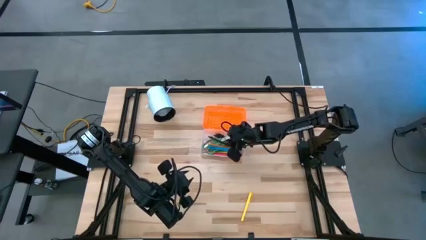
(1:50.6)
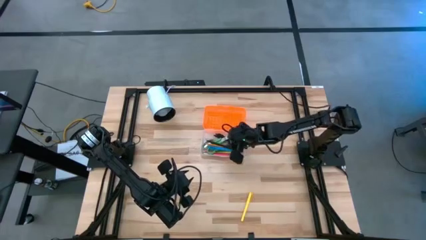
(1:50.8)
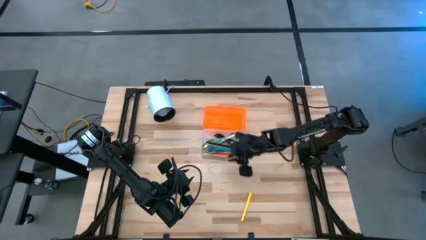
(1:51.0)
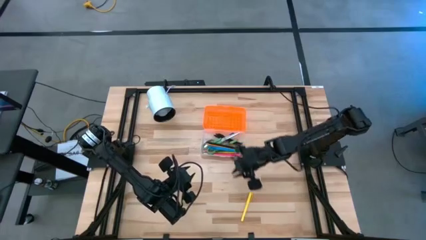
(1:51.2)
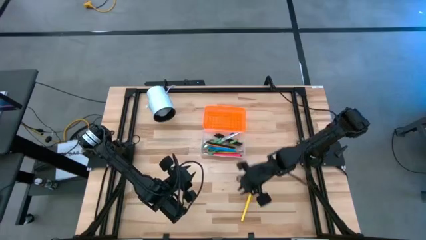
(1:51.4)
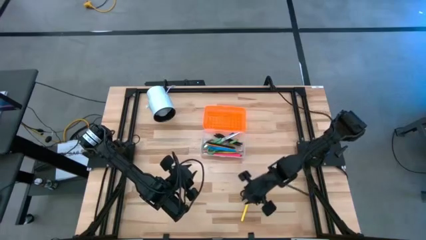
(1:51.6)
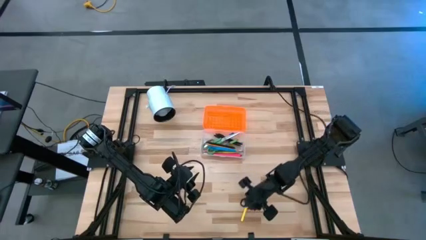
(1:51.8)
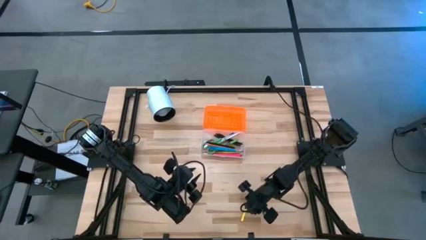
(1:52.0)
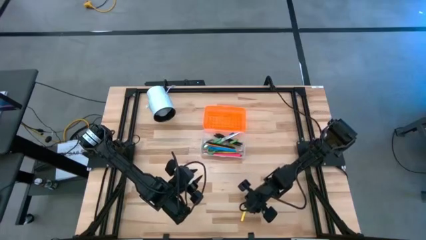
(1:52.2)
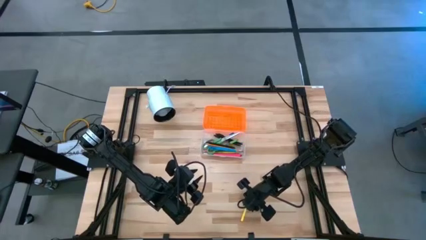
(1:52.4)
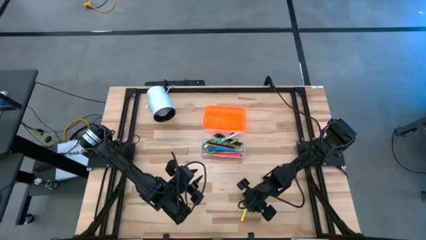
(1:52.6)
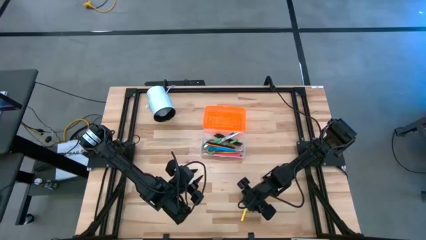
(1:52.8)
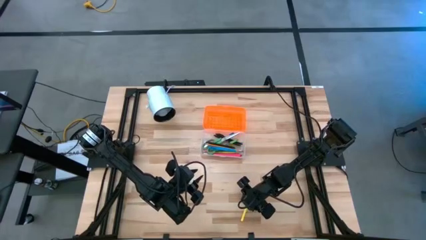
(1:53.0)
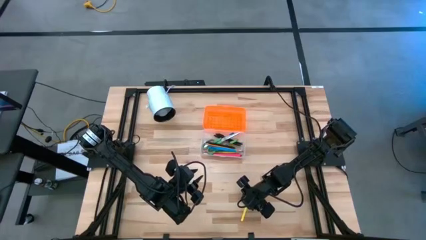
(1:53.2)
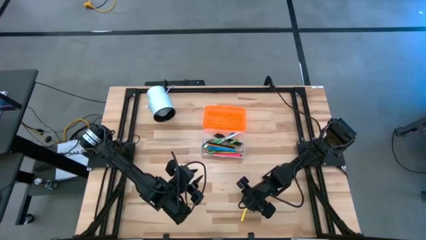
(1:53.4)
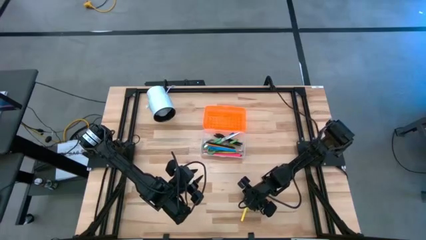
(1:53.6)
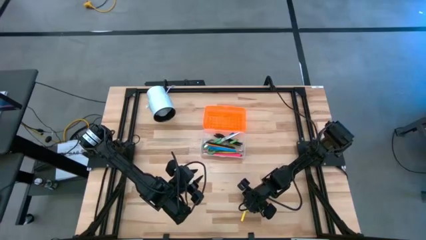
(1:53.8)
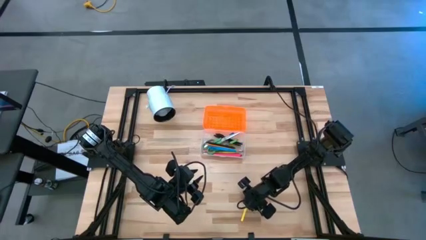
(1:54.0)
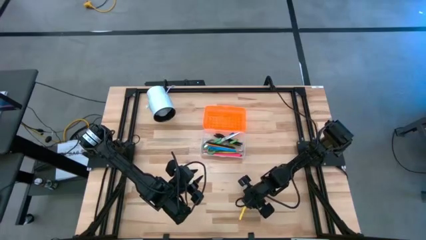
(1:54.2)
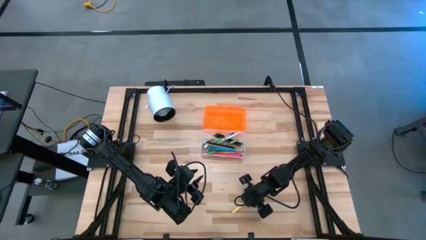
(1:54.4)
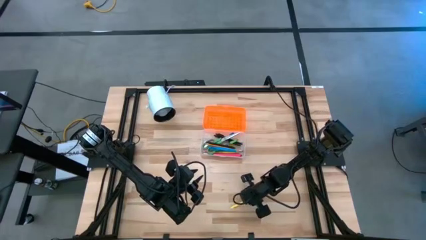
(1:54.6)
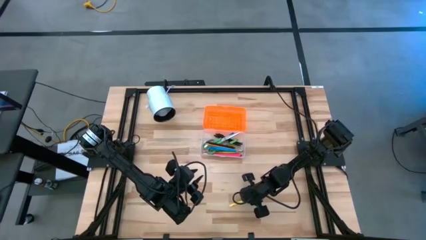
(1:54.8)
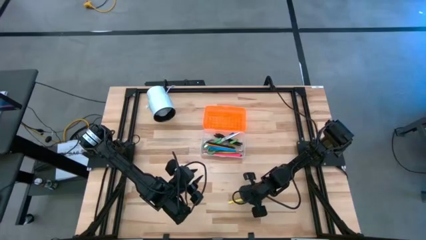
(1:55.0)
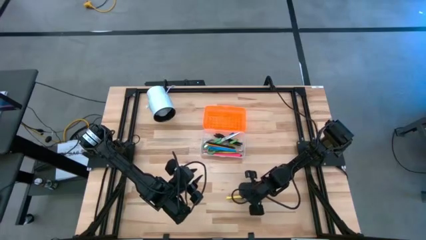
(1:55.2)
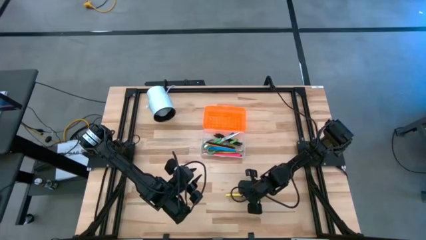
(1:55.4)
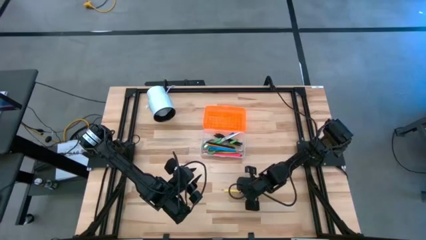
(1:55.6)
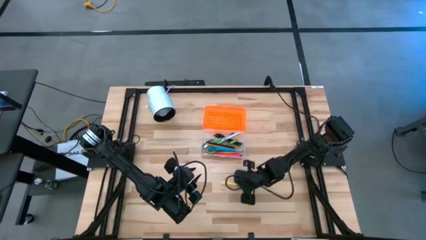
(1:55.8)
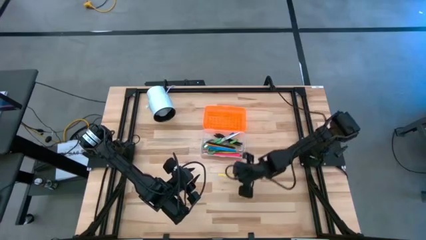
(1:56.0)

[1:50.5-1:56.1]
Task: Pick & place school supplies into a supply box
Put the yellow pen into the orange supply box

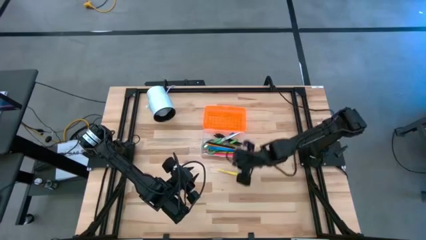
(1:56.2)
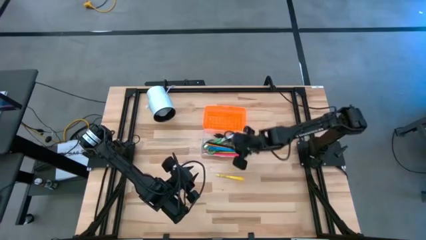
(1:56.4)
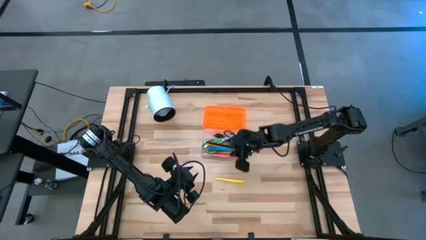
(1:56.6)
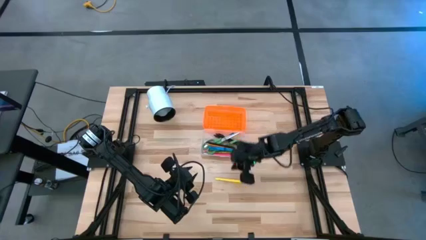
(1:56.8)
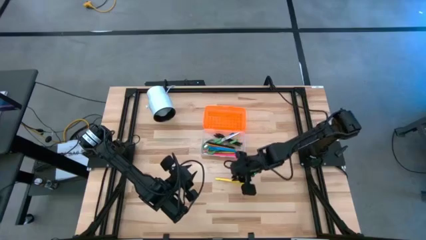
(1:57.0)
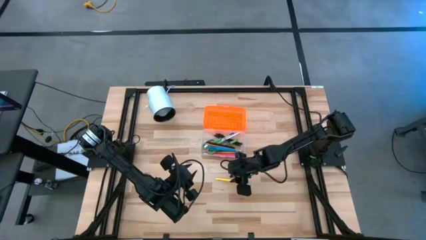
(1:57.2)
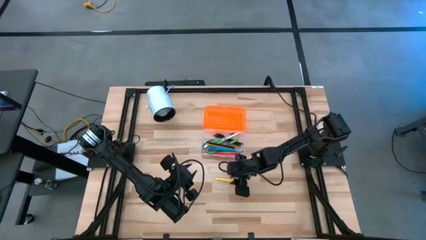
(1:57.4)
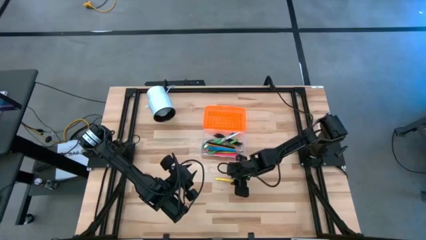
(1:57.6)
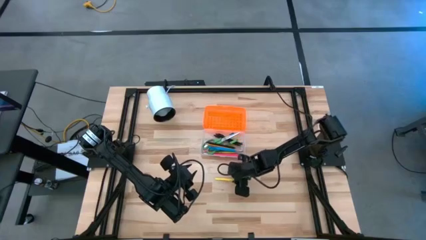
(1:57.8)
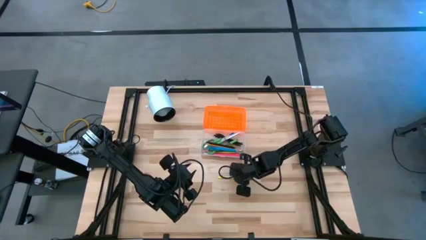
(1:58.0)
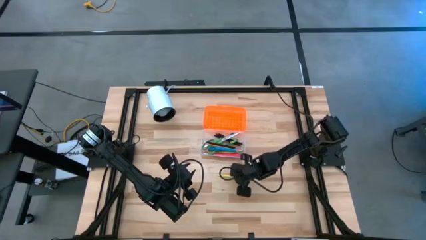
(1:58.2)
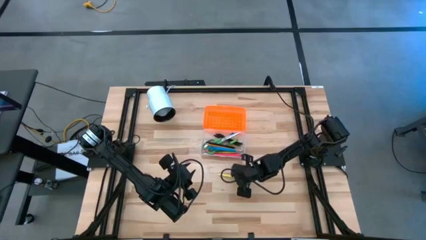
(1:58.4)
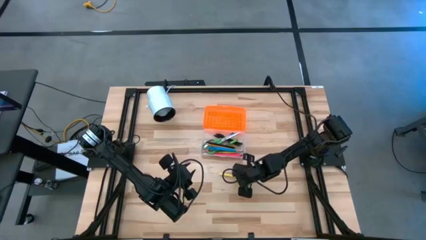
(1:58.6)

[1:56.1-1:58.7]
Put the yellow pen into the orange supply box

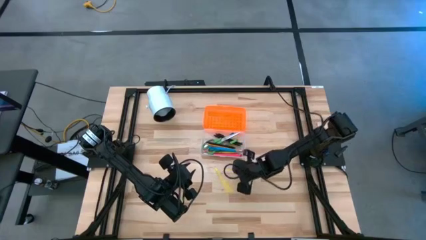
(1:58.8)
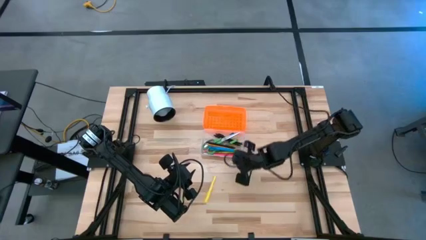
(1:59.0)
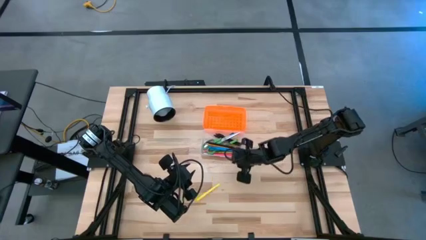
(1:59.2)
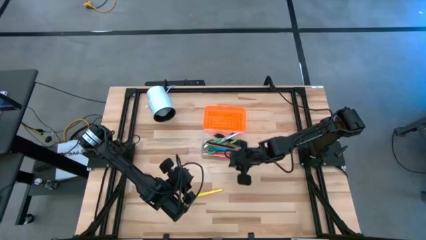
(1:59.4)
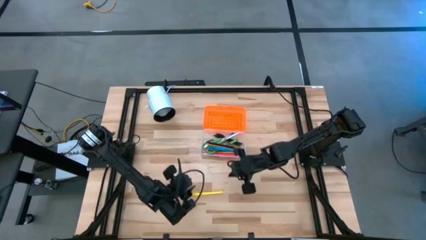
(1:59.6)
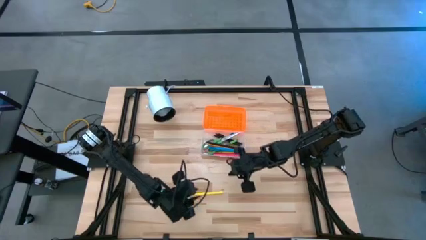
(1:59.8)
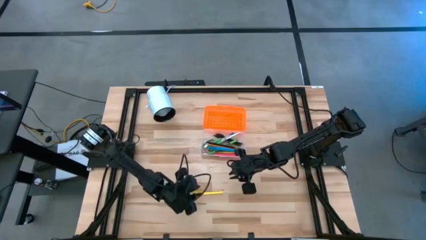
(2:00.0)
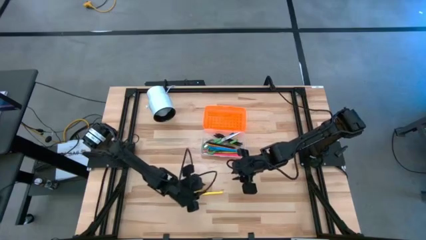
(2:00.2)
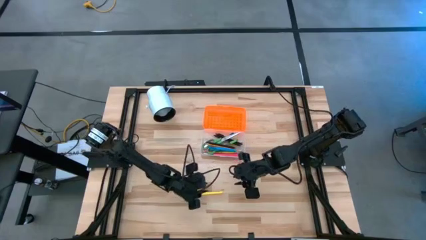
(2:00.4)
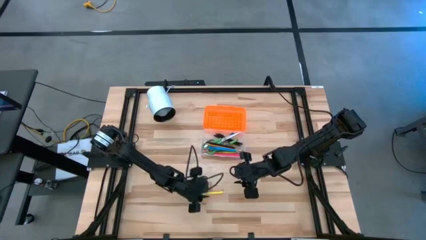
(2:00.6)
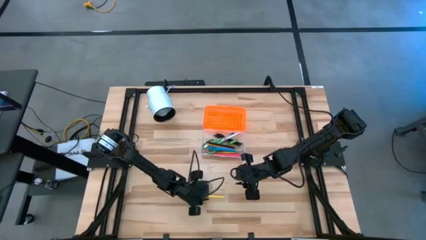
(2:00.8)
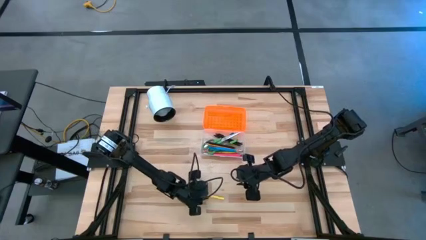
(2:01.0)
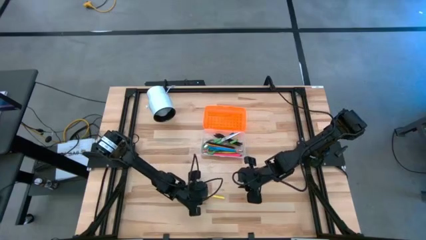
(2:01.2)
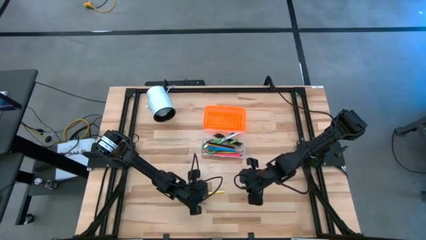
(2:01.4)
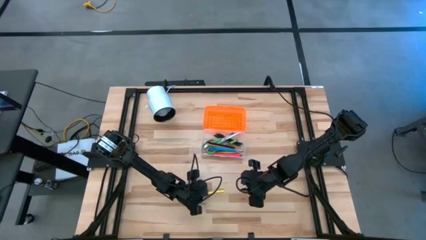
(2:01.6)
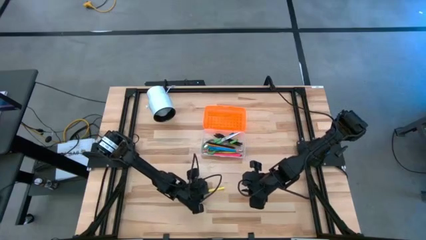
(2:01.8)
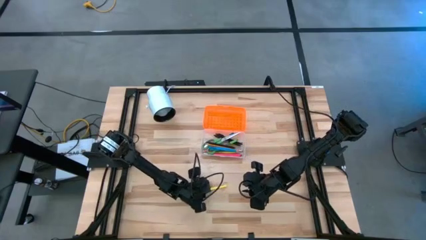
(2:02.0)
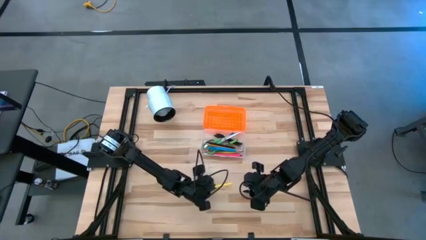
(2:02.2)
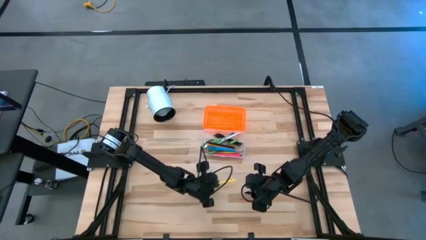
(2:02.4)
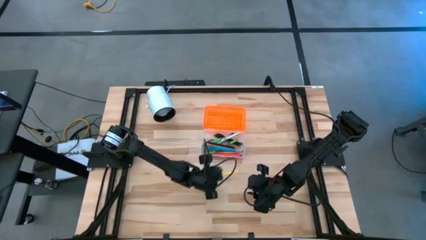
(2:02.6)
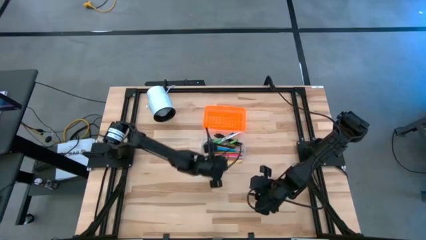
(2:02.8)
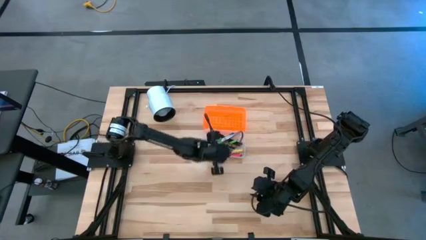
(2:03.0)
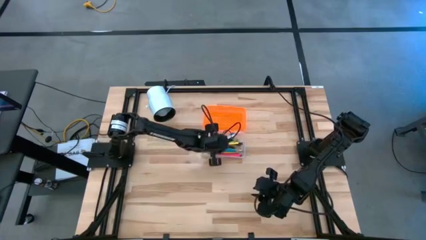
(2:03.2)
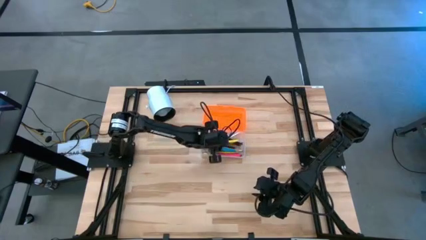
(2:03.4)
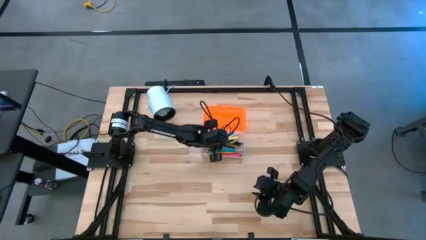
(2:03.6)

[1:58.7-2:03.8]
Put the yellow pen into the orange supply box

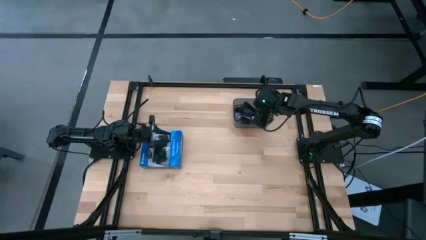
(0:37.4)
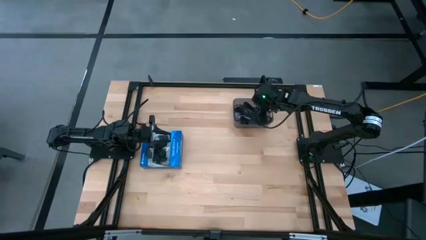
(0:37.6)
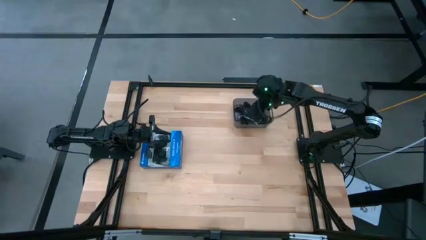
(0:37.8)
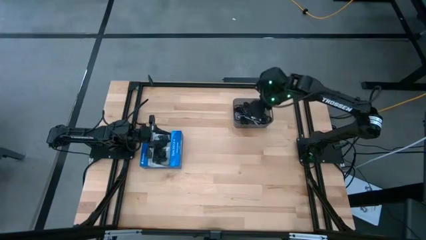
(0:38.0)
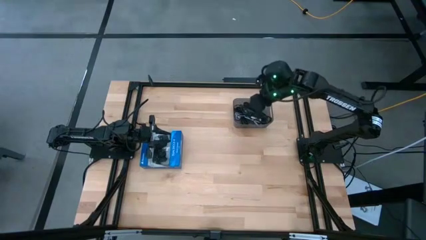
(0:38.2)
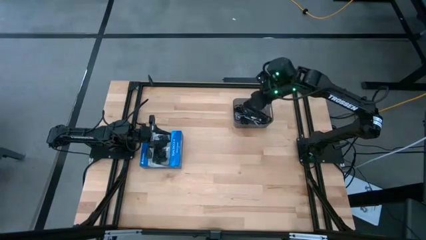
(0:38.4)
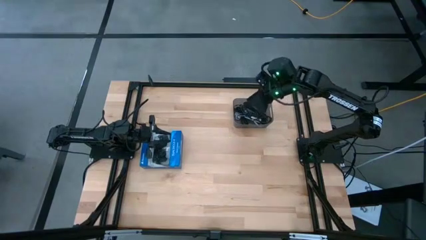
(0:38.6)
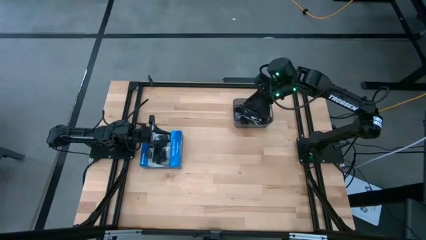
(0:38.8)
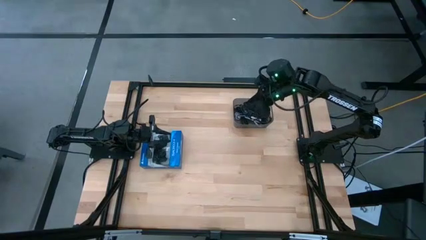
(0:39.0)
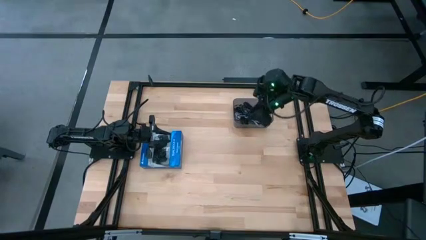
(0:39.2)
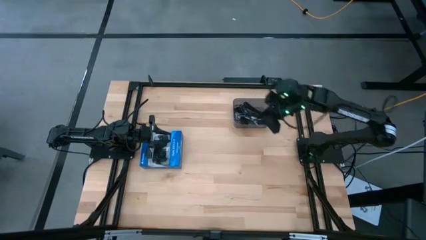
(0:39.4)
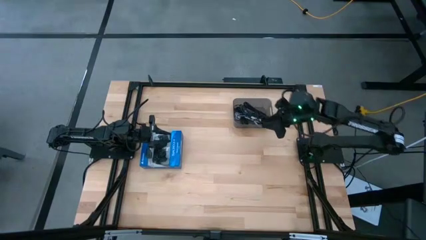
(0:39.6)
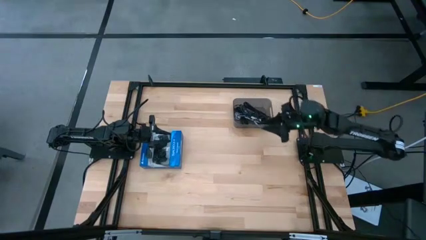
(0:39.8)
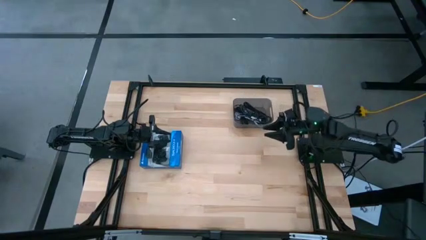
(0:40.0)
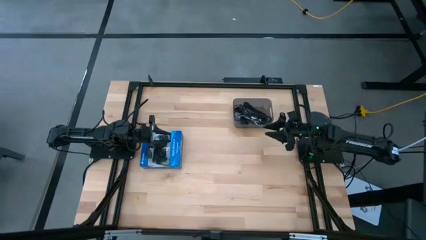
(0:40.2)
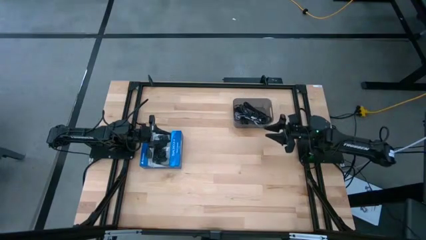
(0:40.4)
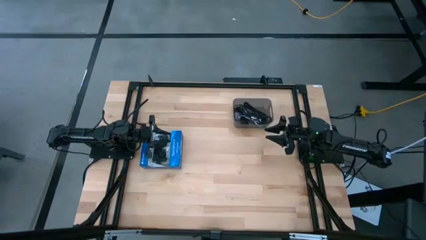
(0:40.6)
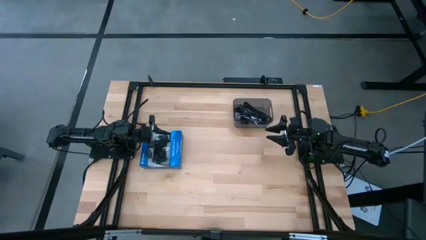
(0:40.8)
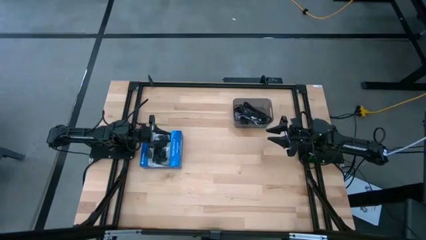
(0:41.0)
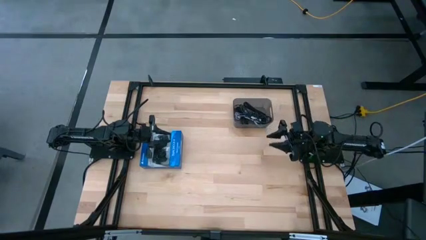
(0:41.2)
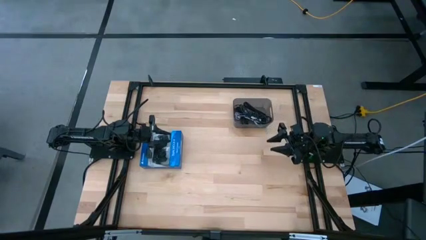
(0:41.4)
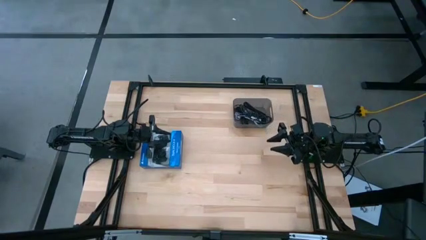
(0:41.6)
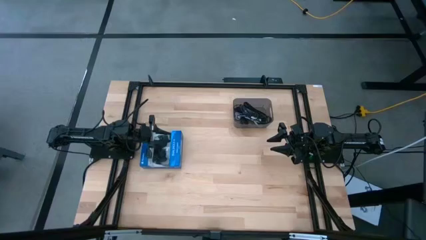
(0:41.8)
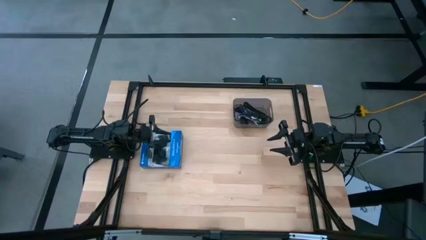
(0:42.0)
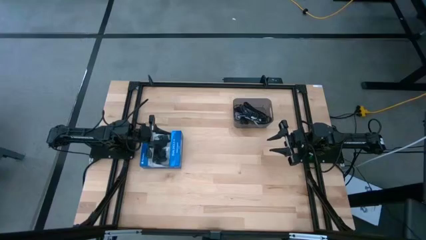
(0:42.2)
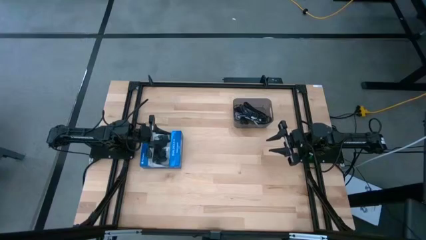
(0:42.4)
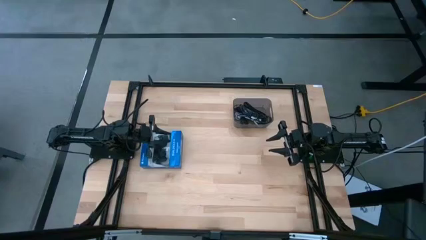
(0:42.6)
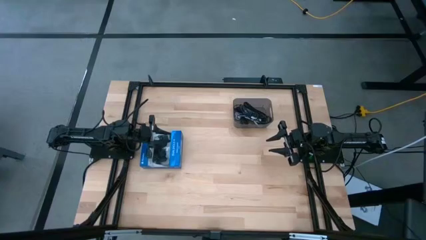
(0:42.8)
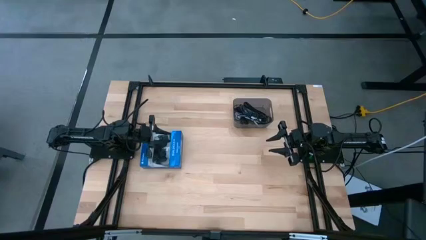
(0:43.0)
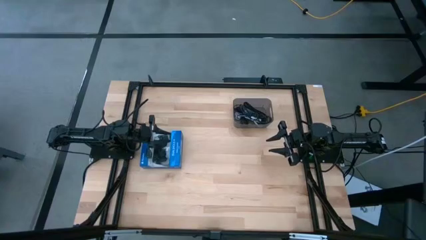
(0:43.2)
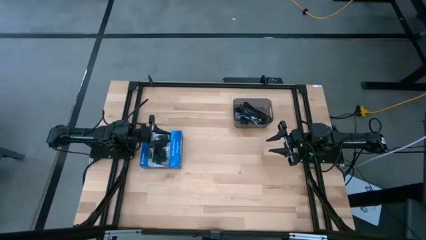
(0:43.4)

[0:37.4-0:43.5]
Task: Pick and place USB-C Cables
Return to Home Position
